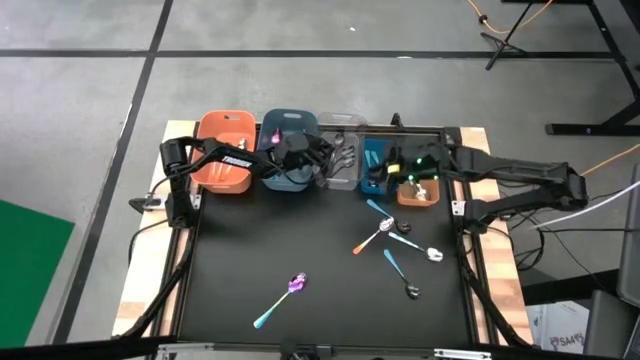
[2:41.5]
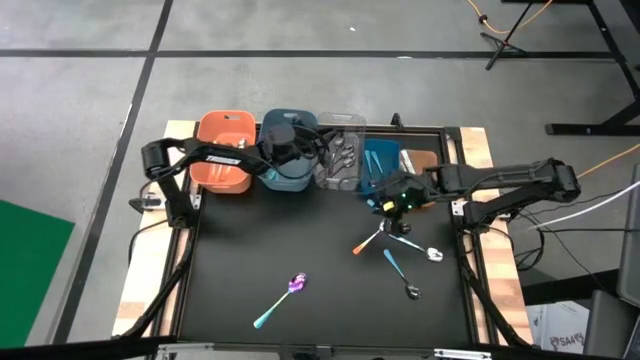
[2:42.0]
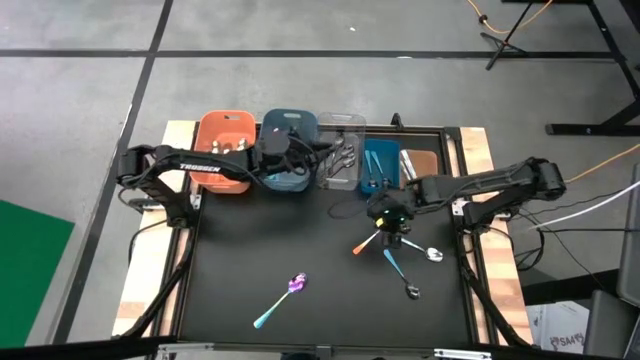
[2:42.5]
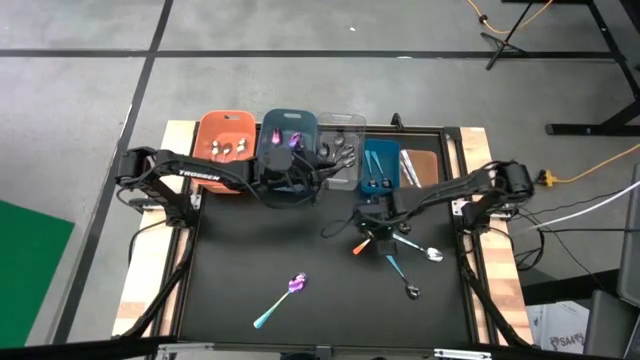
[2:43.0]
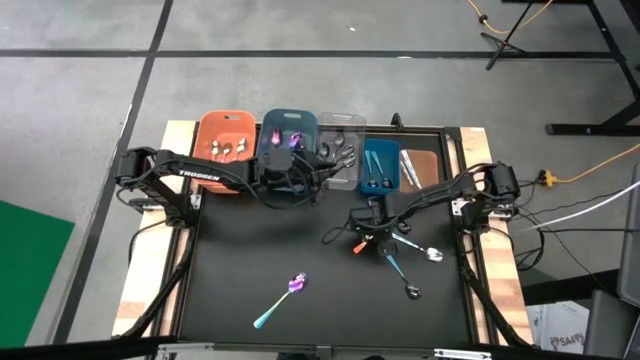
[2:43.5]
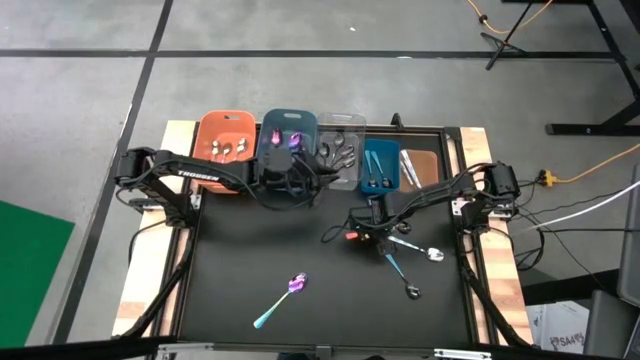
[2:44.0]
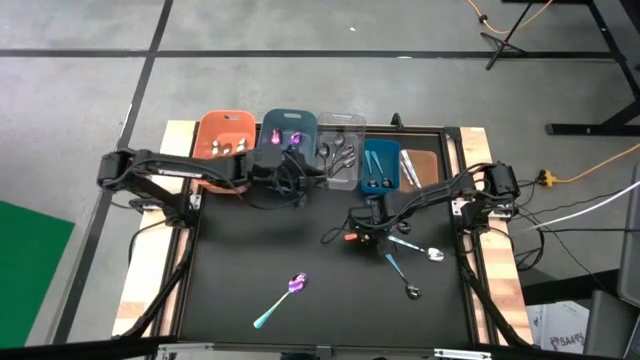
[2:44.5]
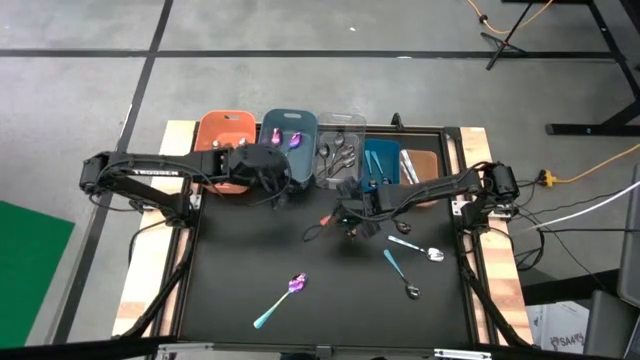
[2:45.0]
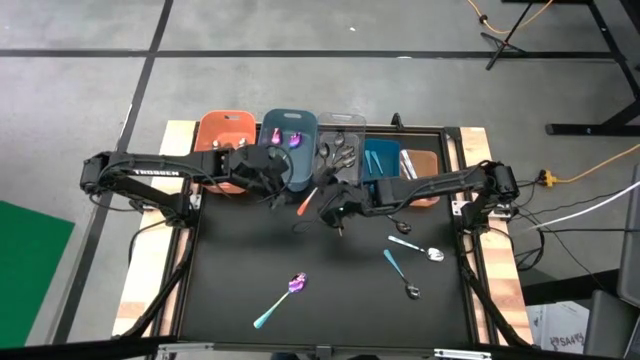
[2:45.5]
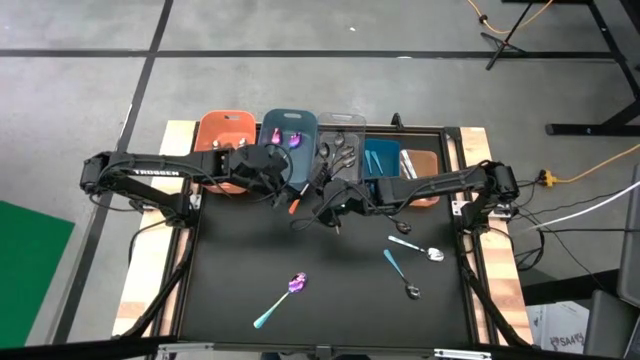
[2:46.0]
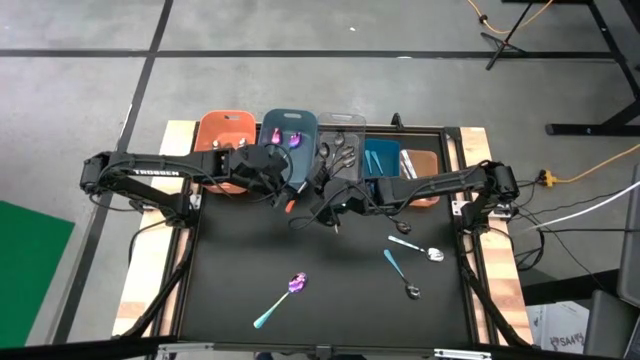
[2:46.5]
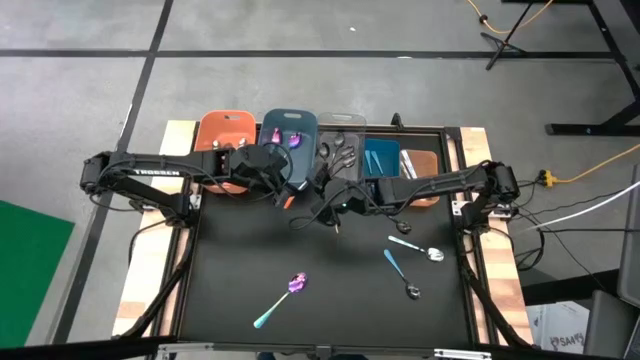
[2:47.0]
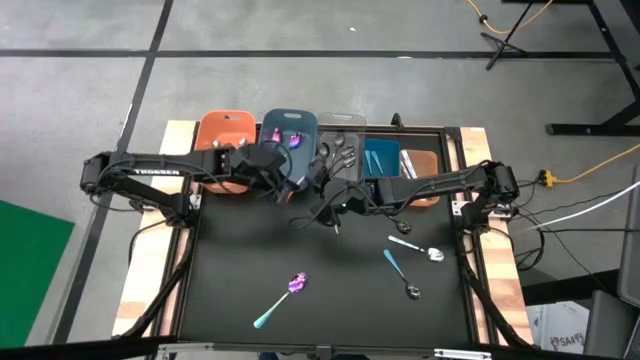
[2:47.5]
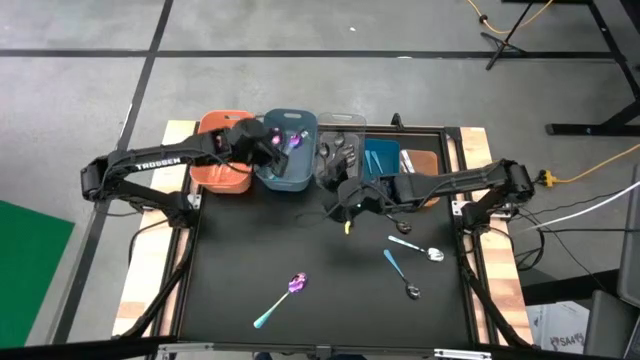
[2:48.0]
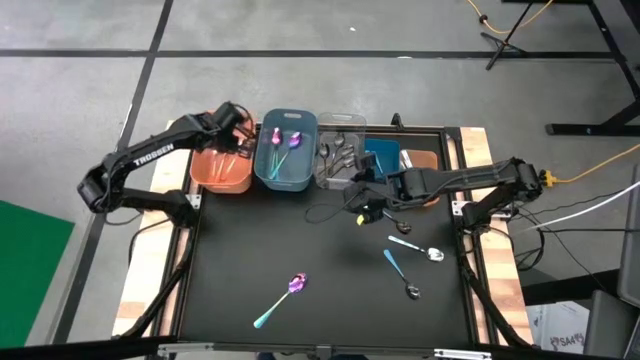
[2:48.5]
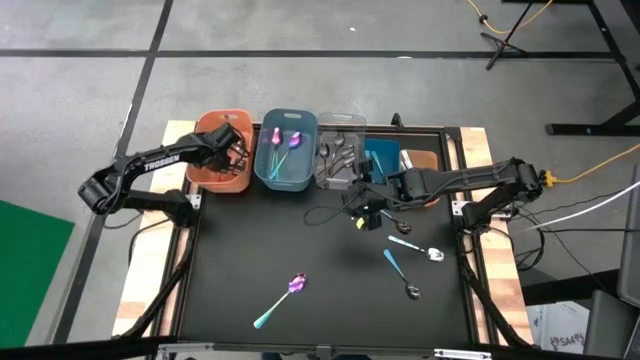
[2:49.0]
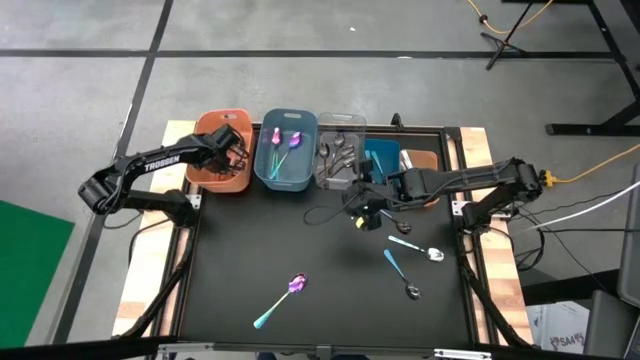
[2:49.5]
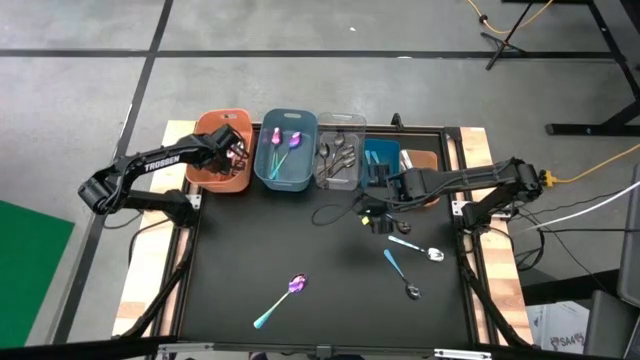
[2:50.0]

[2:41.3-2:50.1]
Task: Sort silverware by color (type)
Put the orange spoon into the left orange bin

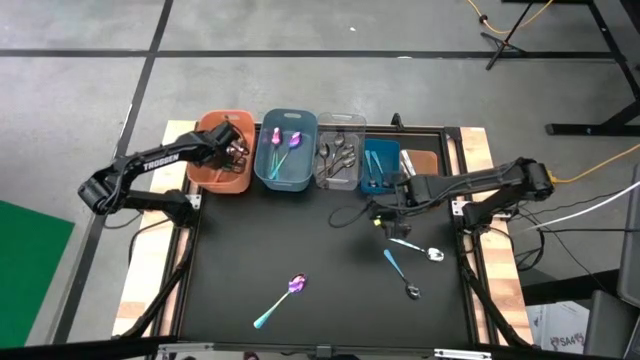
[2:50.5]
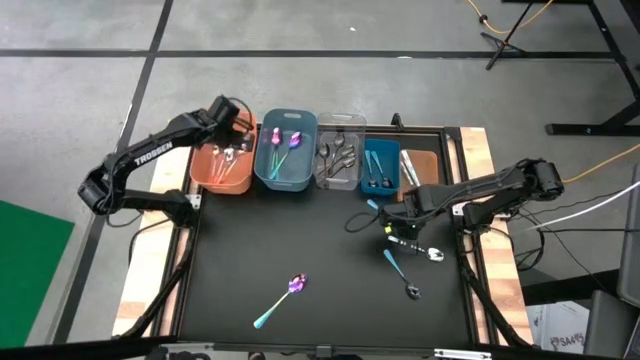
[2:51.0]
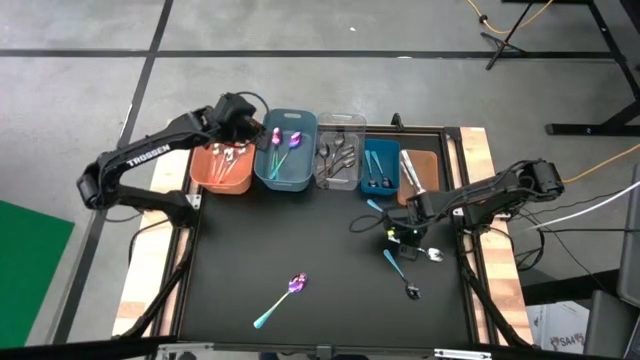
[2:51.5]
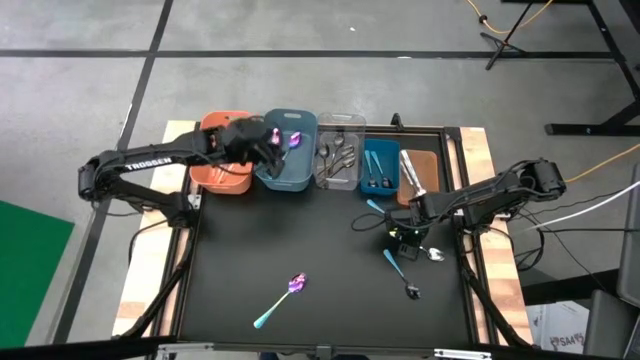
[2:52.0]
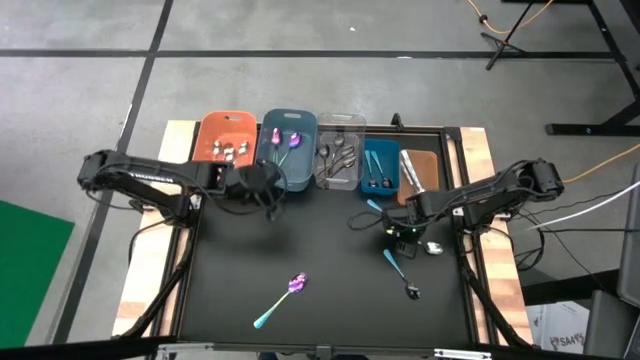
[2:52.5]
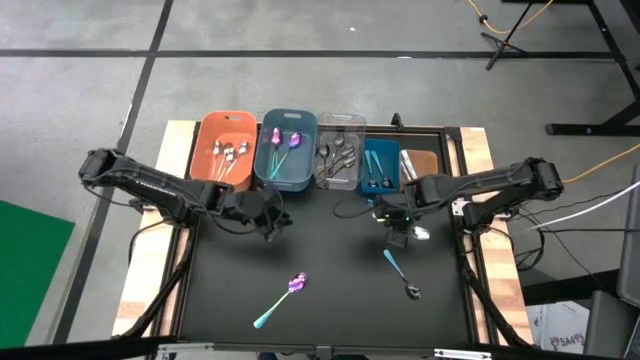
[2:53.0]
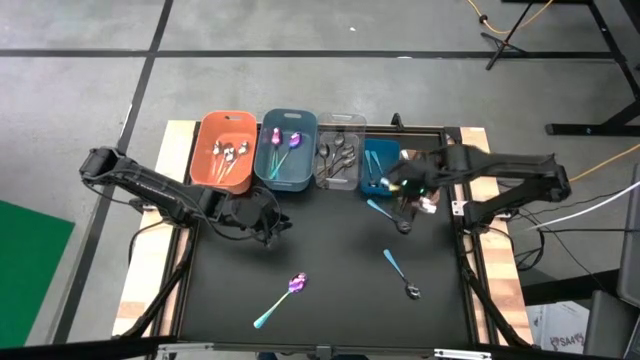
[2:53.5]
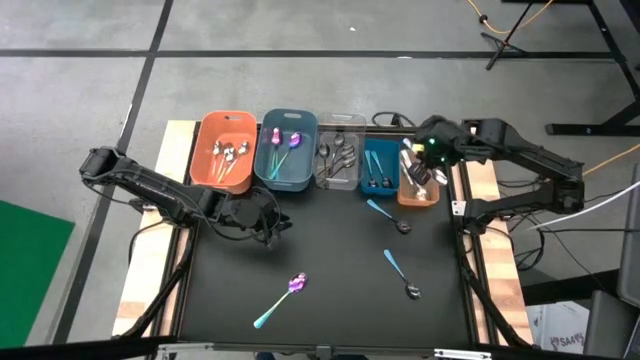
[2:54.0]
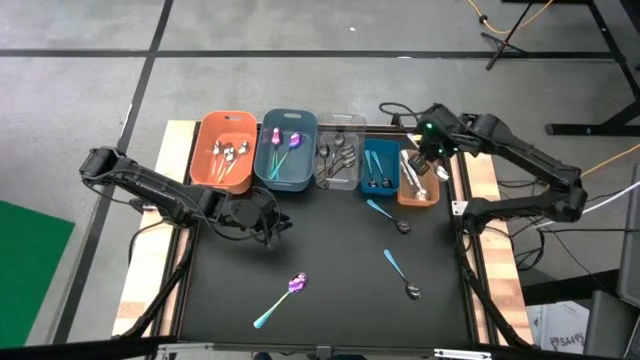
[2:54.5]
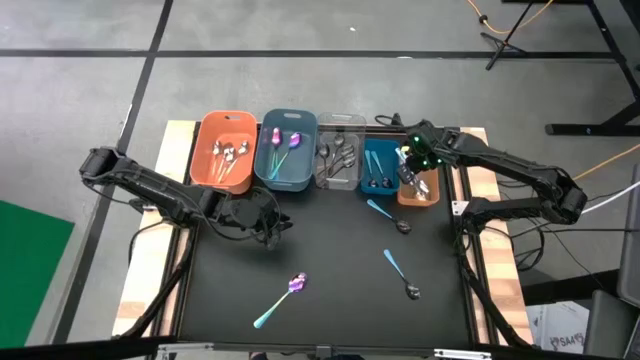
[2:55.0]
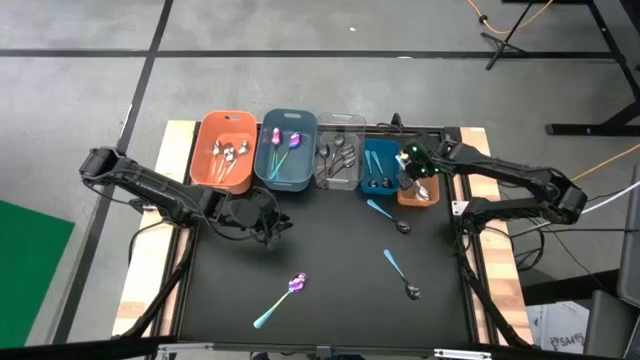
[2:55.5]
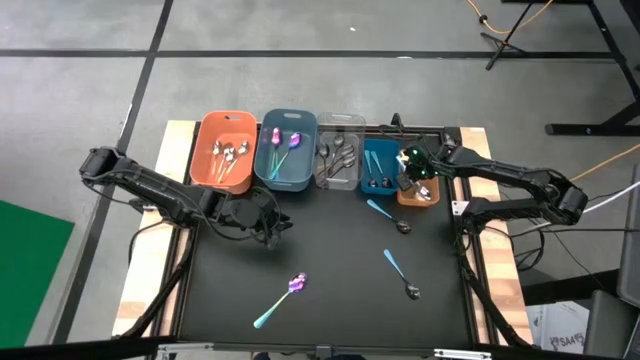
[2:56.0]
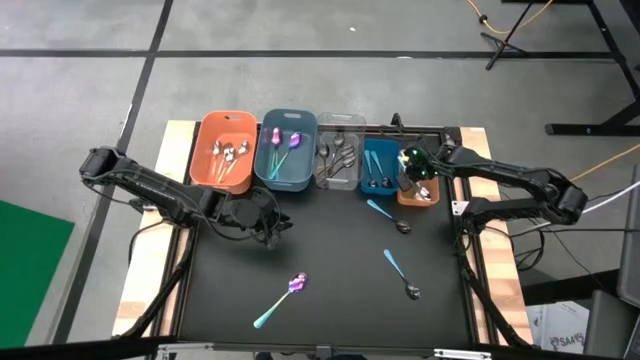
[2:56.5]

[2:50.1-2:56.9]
Put the white and blue spoon into the right orange bin

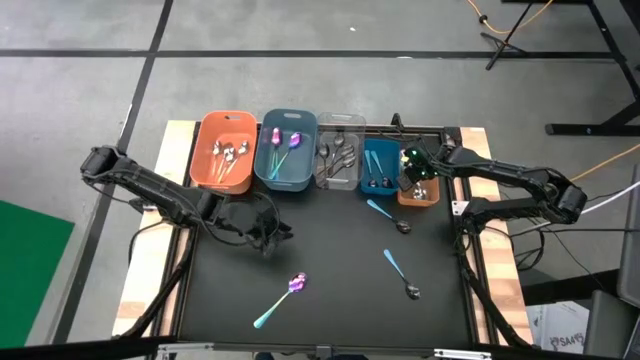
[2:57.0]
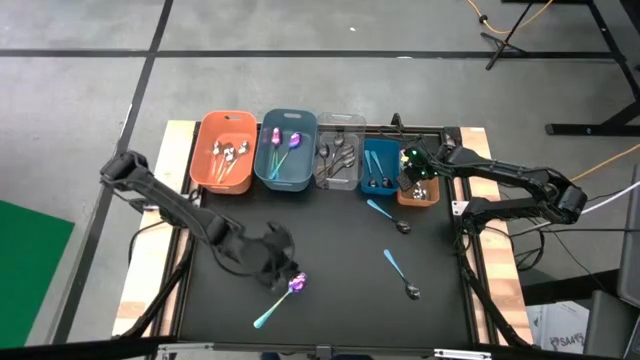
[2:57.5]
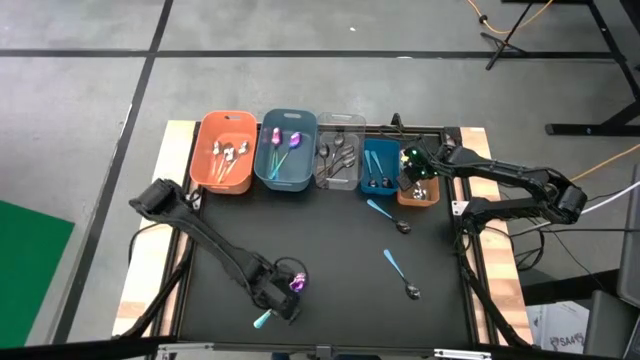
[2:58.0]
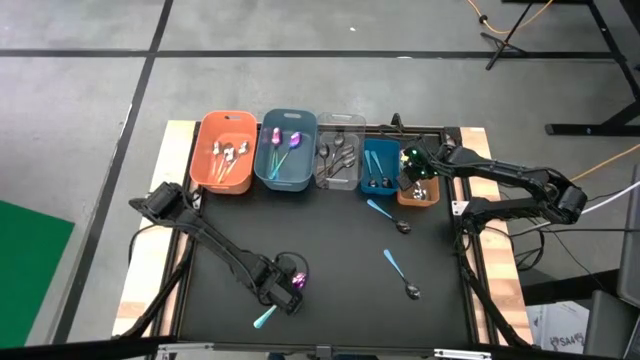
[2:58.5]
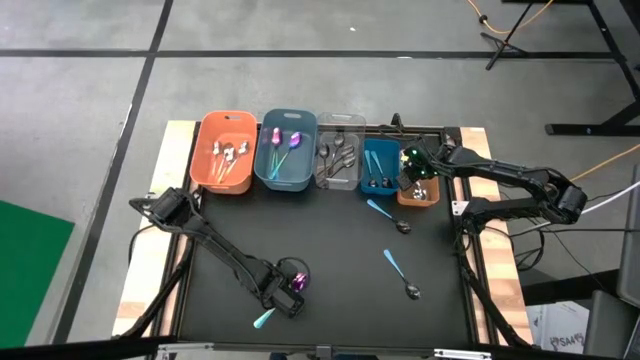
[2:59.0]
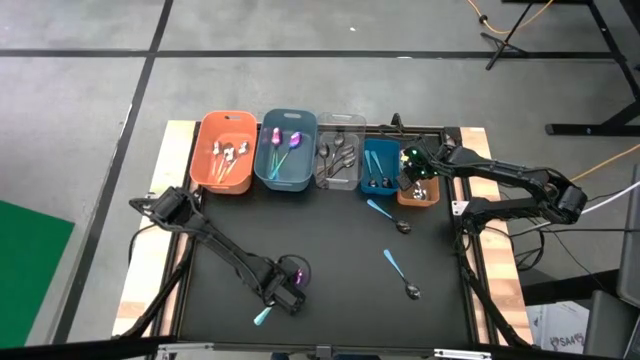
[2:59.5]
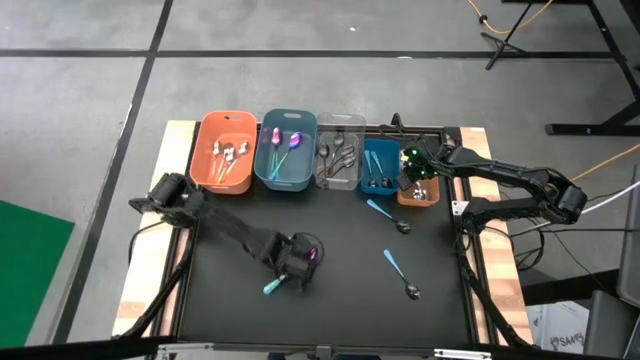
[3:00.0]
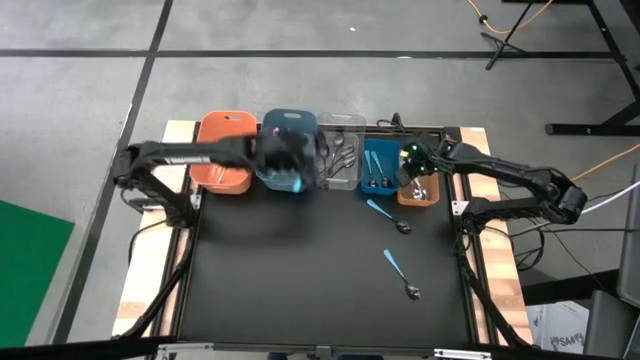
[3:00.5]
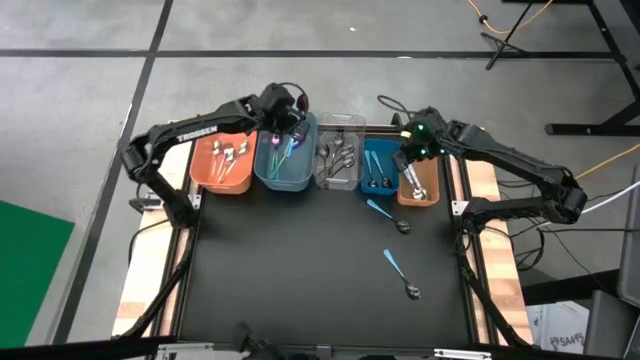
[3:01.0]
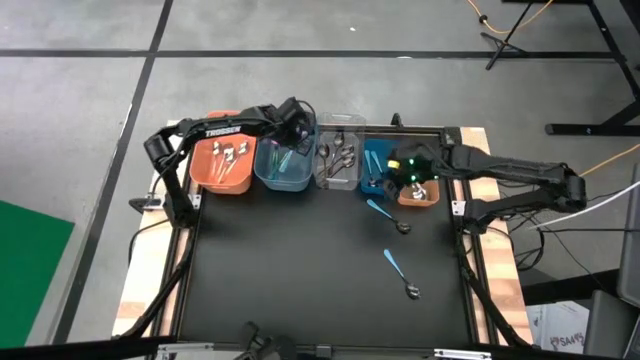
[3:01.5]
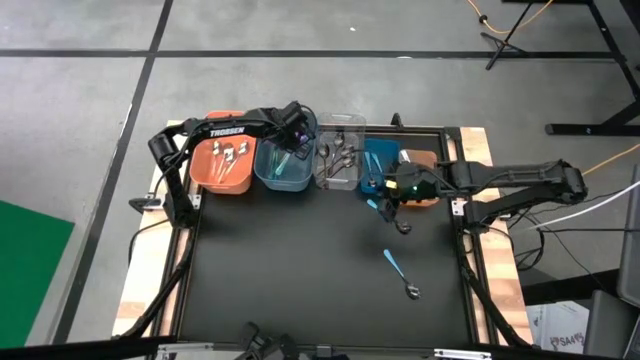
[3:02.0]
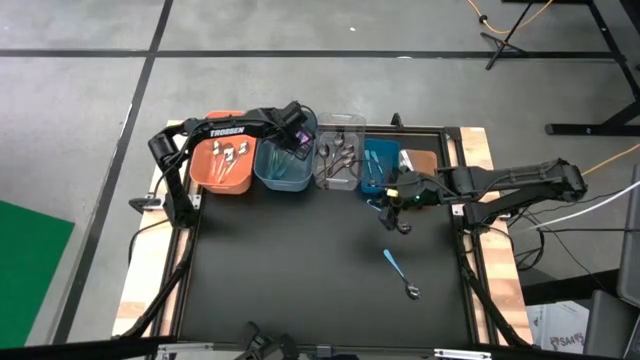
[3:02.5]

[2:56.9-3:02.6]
Put the purple spoon into the left blue bin

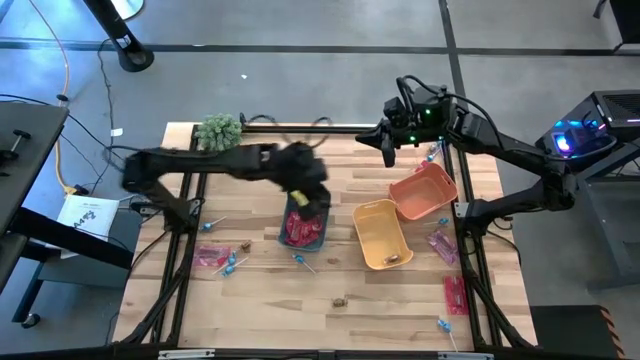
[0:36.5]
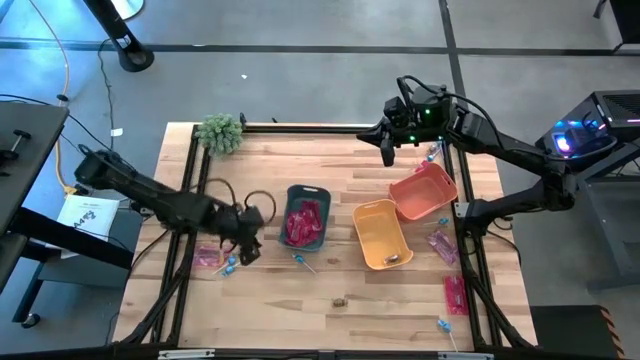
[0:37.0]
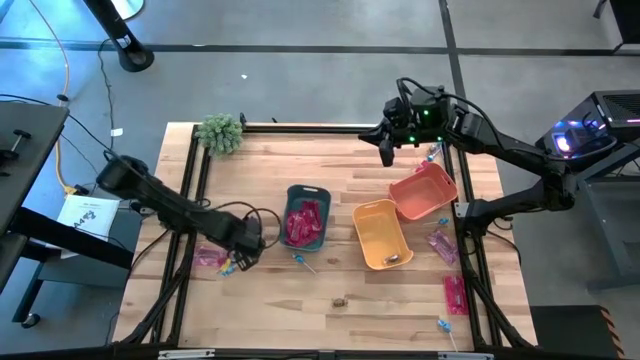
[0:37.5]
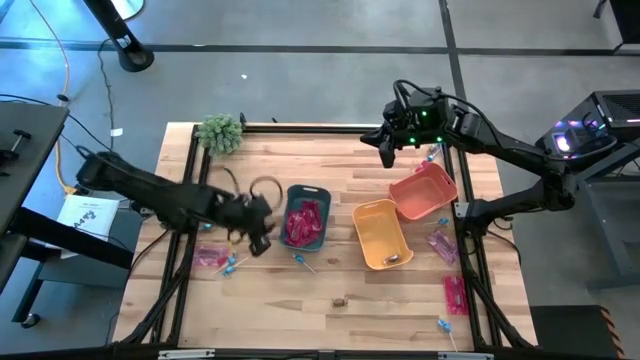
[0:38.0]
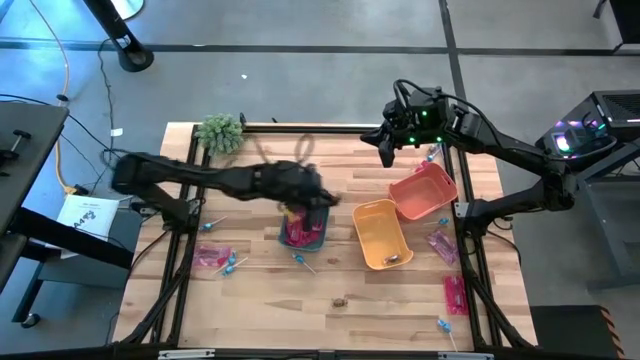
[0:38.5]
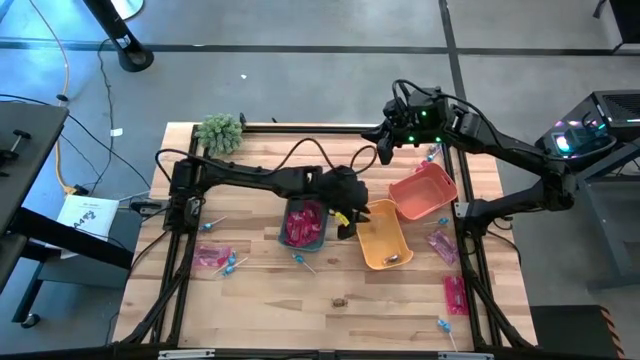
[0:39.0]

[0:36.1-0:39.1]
Task: Sort candy
Put the yellow candy into the yellow bin
